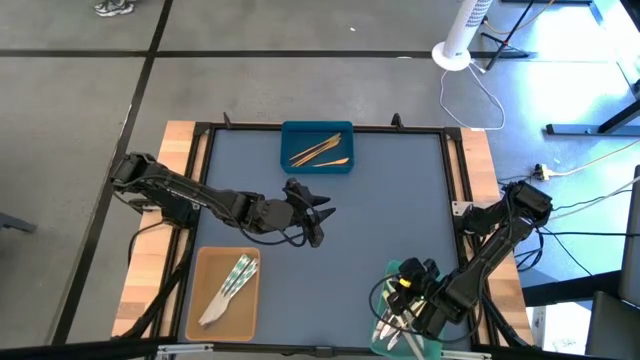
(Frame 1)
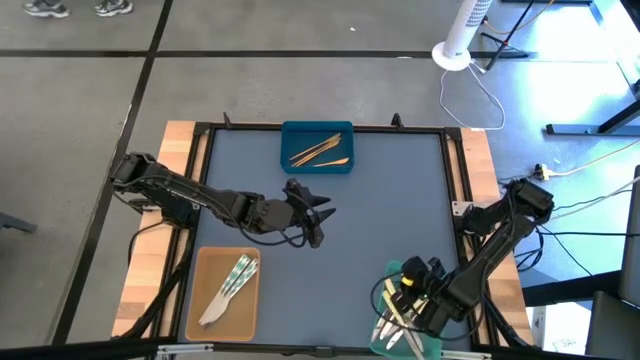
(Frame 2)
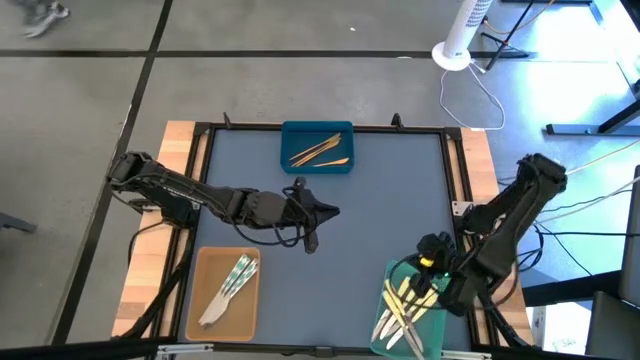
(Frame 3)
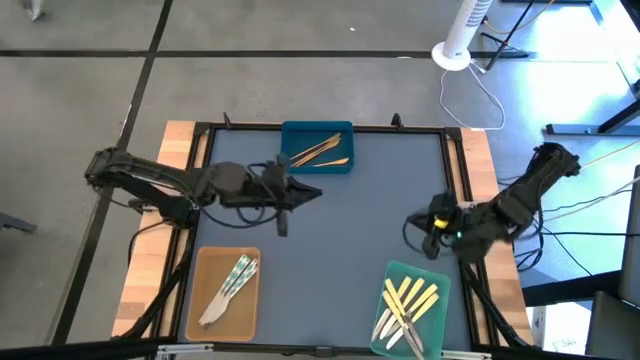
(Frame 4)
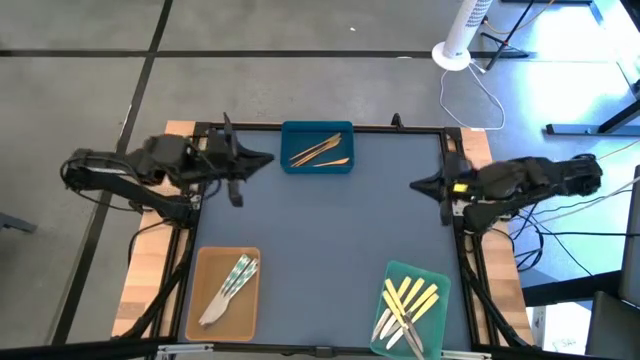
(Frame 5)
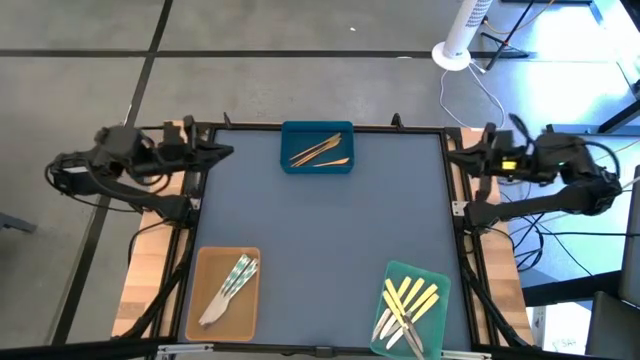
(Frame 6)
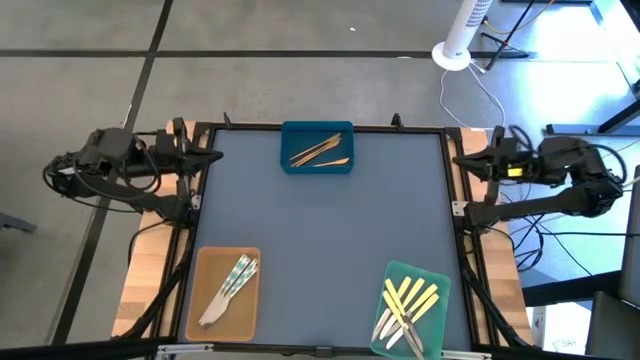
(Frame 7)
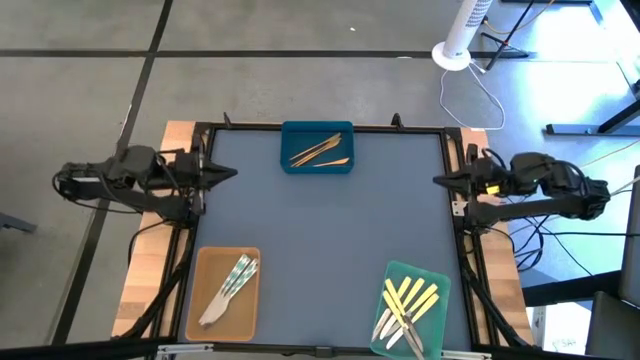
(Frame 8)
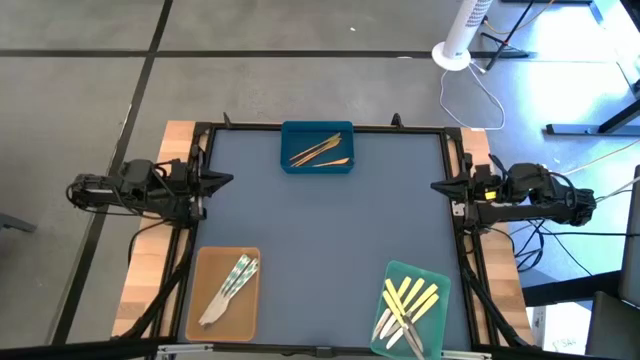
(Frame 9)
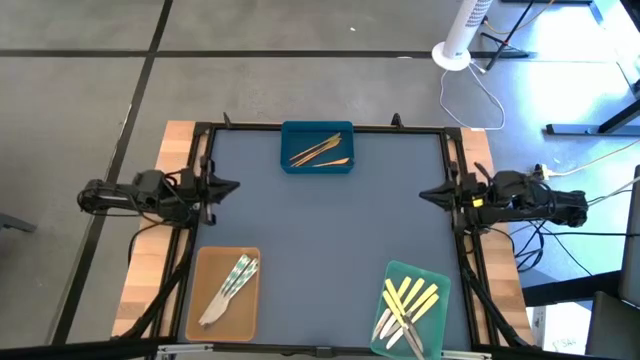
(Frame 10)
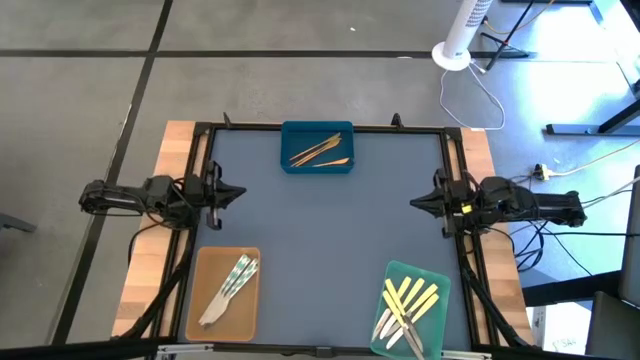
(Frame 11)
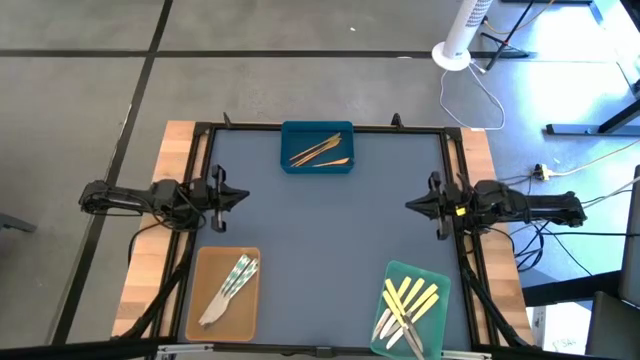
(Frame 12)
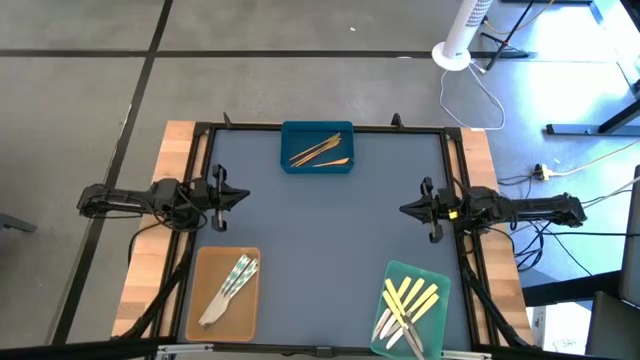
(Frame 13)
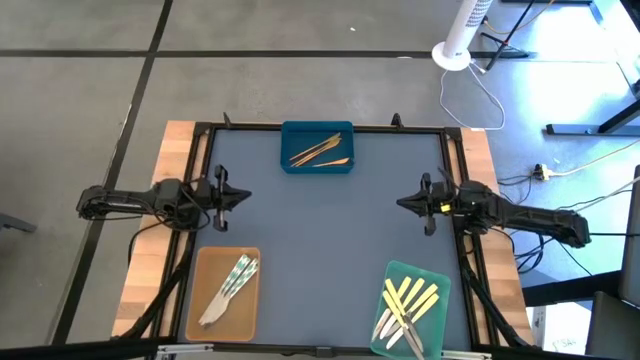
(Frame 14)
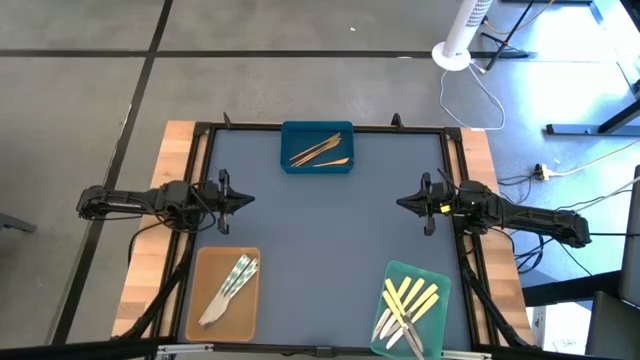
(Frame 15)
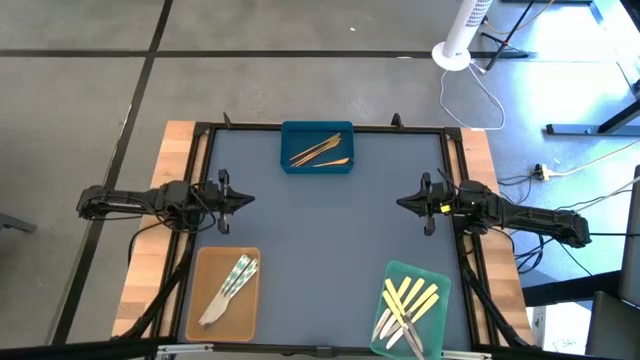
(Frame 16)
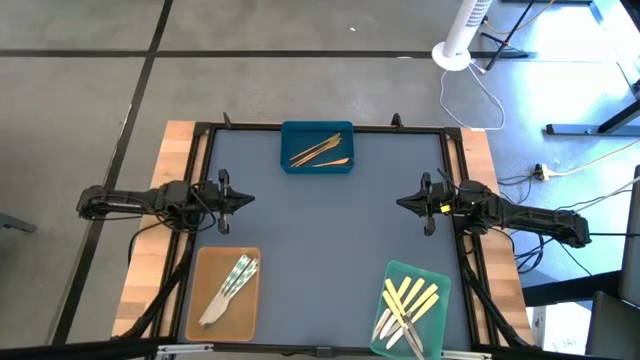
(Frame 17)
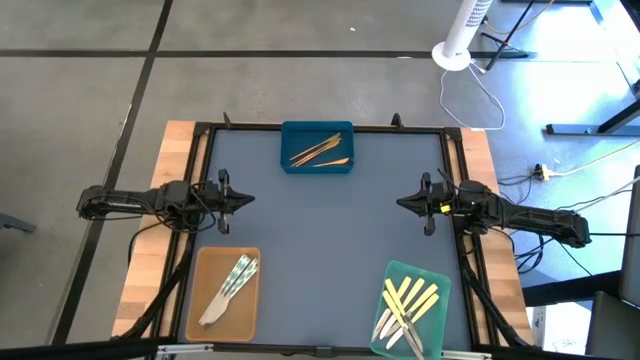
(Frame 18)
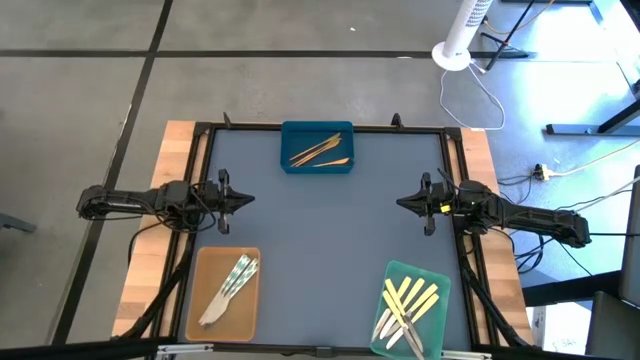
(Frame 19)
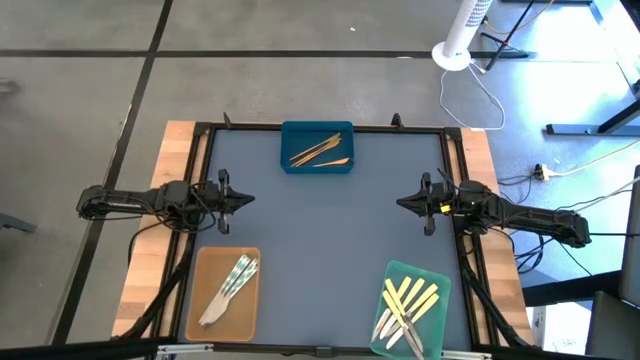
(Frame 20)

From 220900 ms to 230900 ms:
Task: Sort silverware by color (type)
Return to Home Position

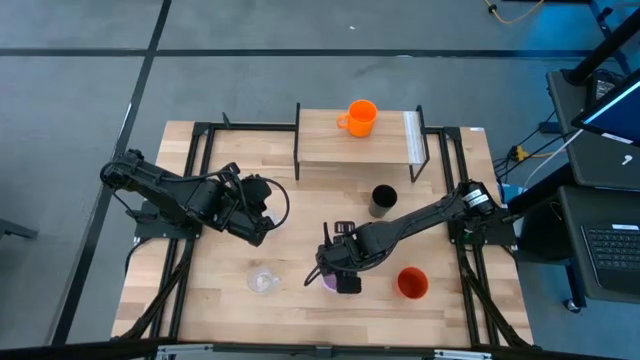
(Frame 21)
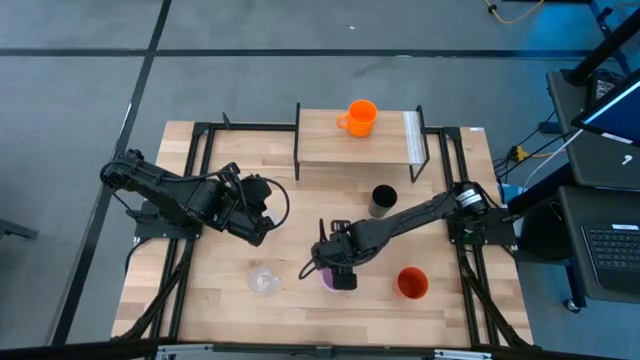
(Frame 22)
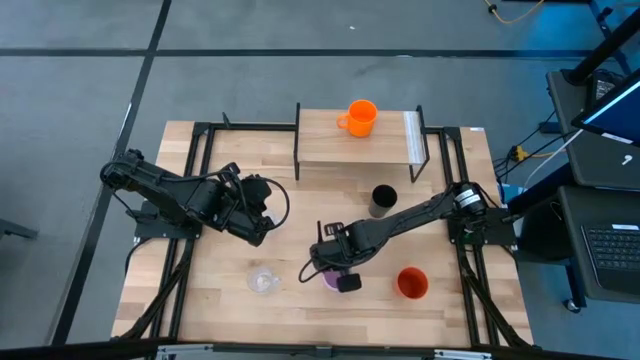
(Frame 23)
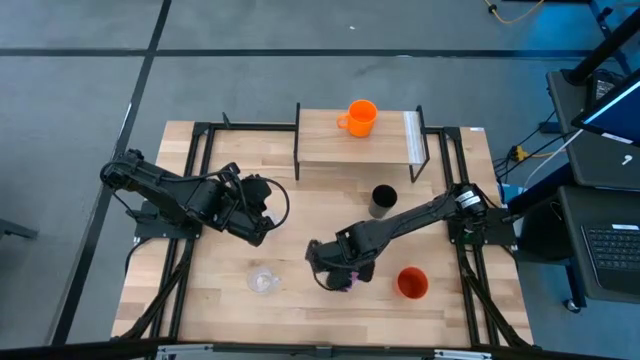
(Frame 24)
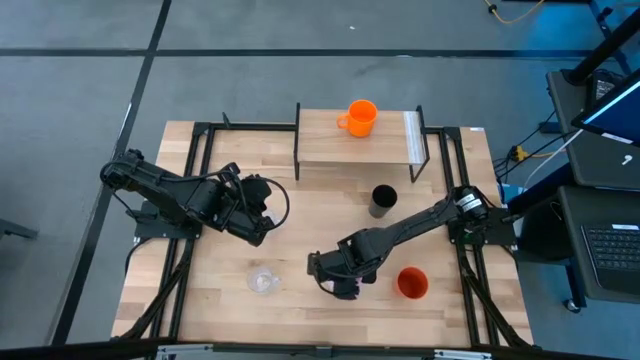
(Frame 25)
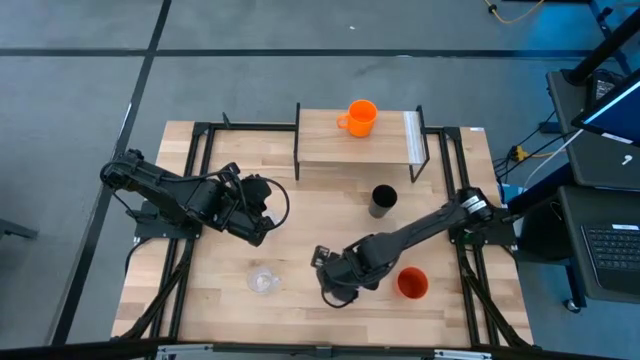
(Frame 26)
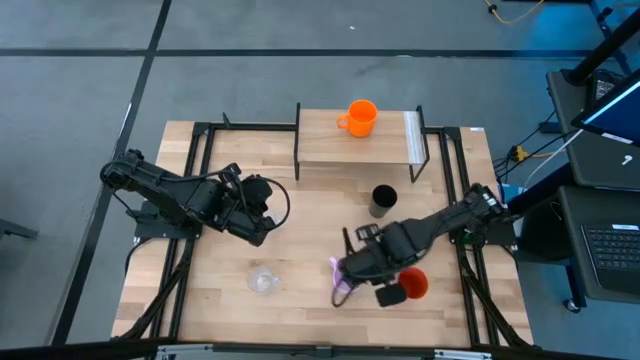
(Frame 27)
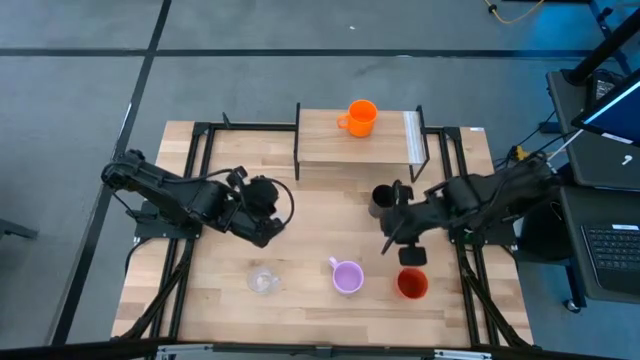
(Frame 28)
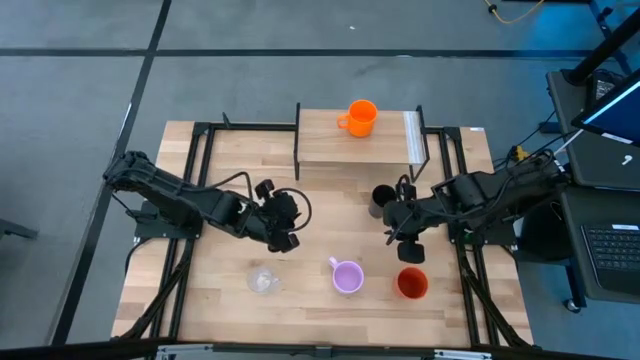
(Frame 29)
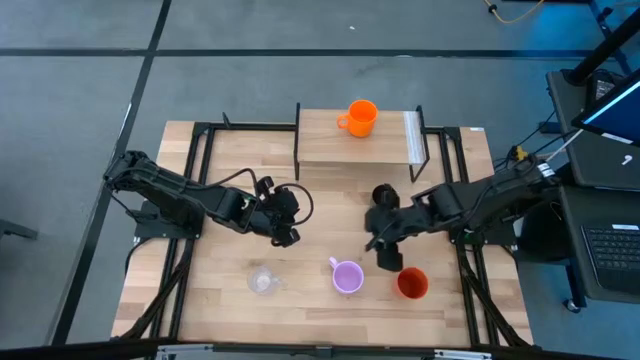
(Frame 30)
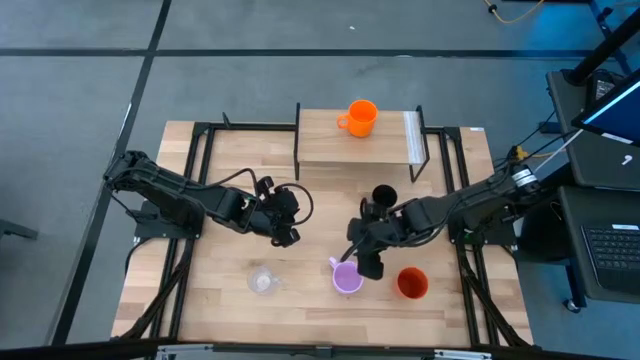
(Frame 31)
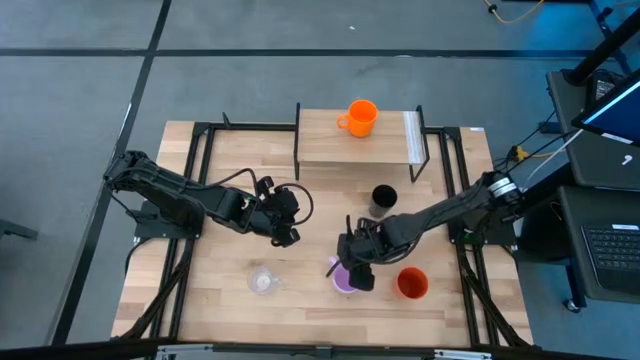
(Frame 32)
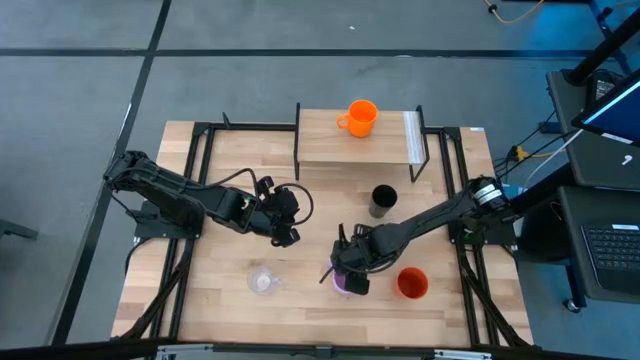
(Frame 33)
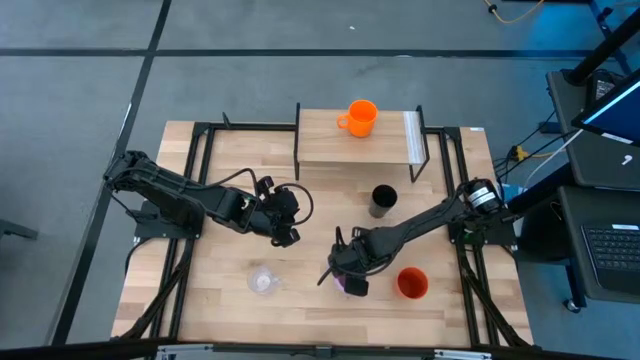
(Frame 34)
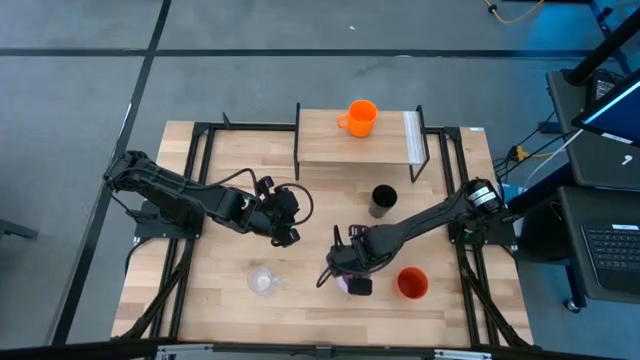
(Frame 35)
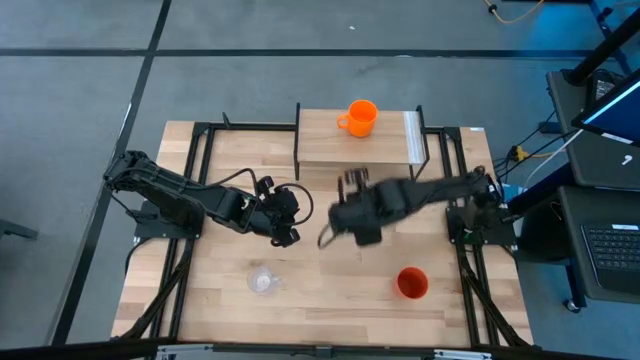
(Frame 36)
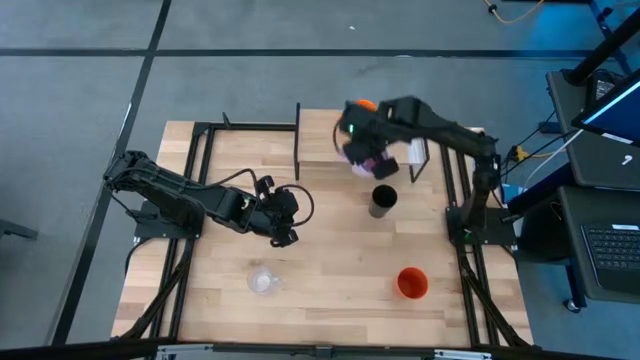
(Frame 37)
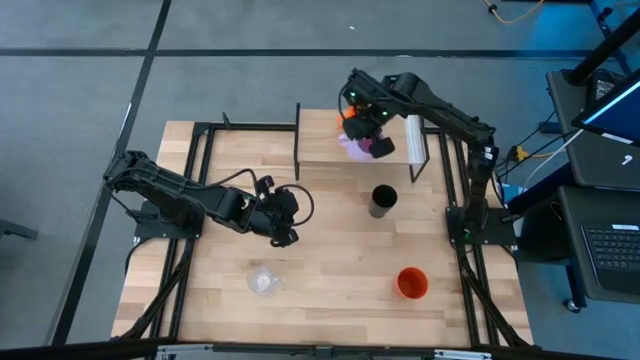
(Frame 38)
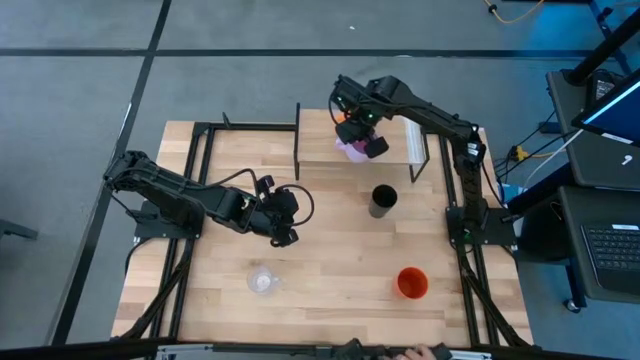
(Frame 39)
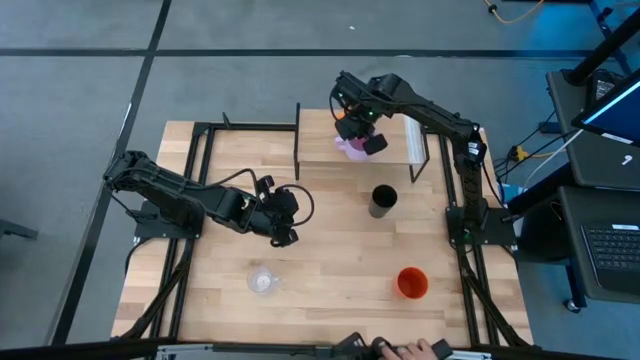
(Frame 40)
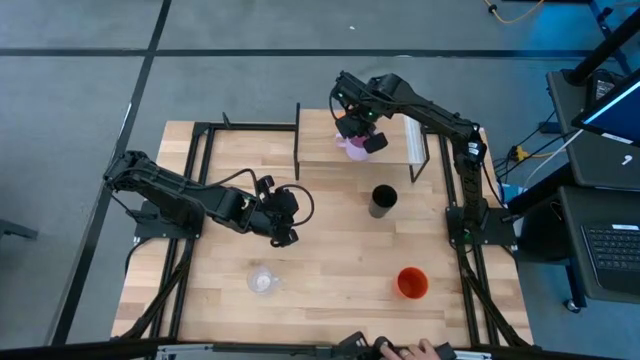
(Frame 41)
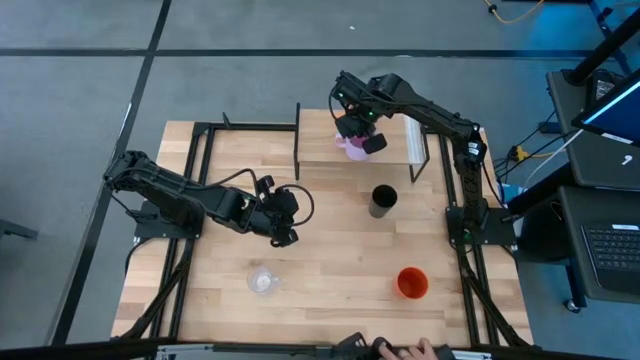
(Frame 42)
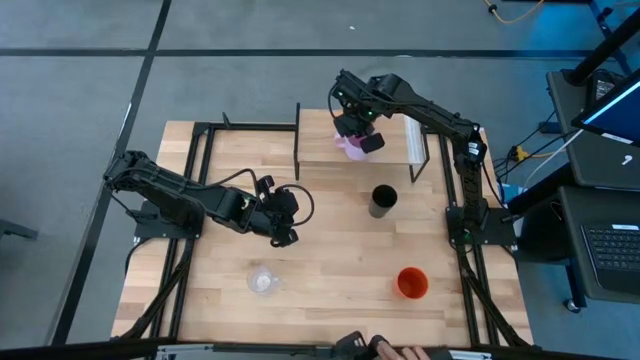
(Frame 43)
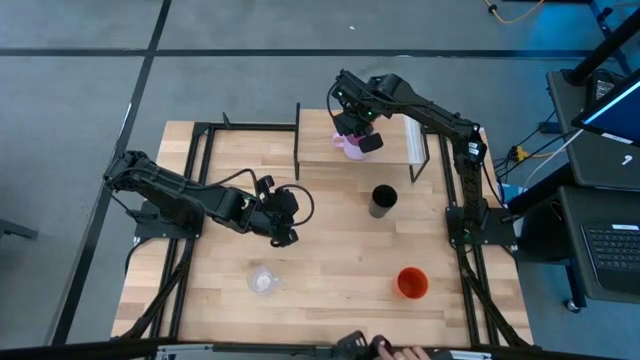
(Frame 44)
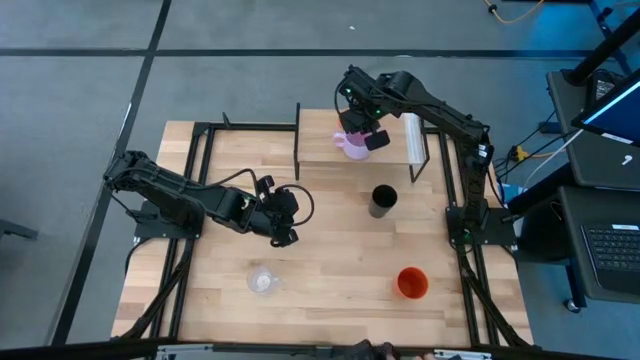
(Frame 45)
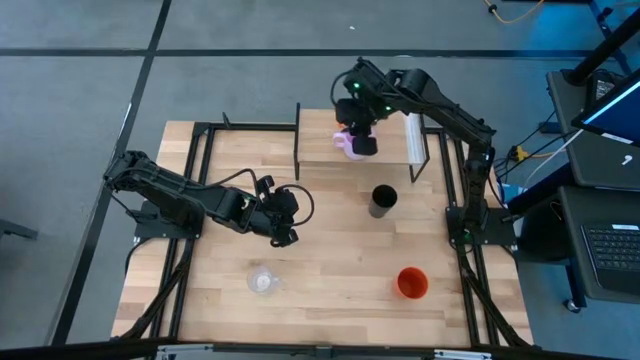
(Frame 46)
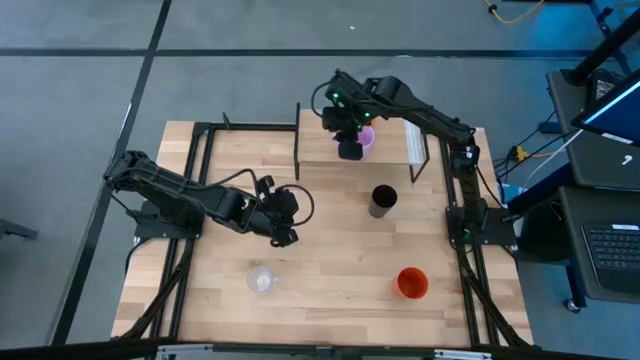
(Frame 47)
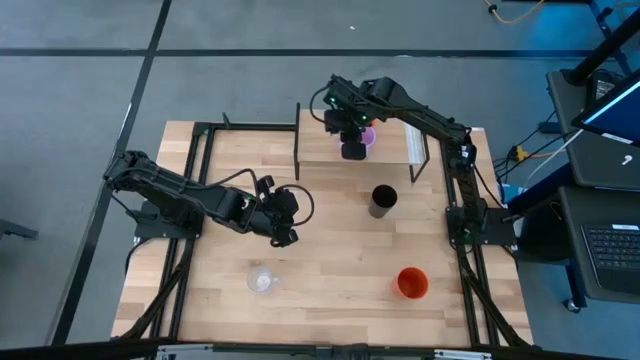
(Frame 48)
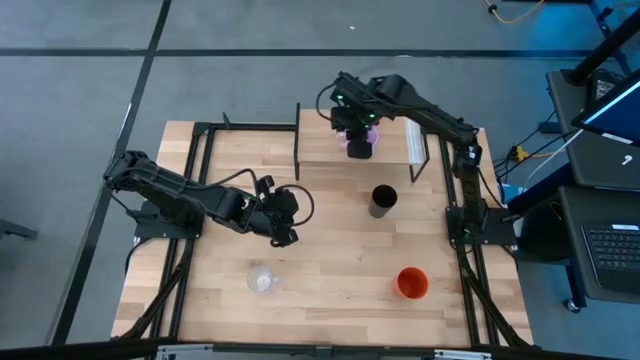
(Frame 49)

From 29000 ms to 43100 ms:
Task: Stack small to large cups/mugs on shelf
Put the purple mug on the shelf
